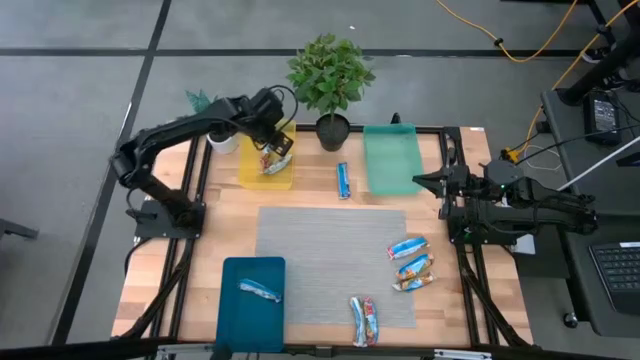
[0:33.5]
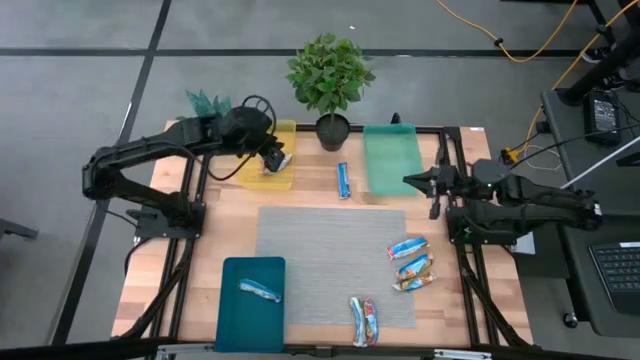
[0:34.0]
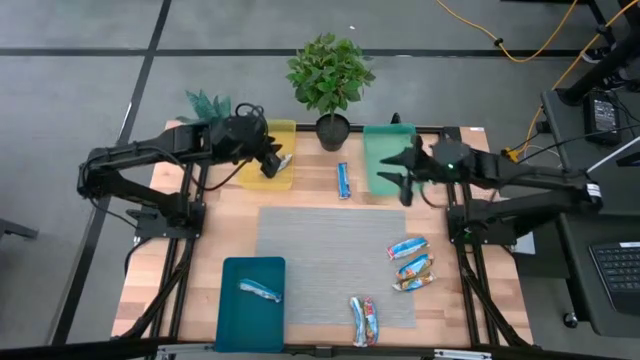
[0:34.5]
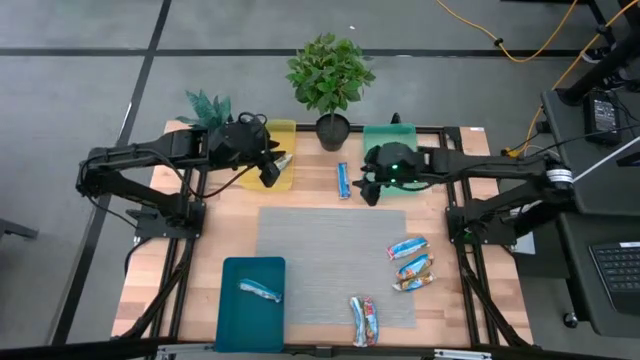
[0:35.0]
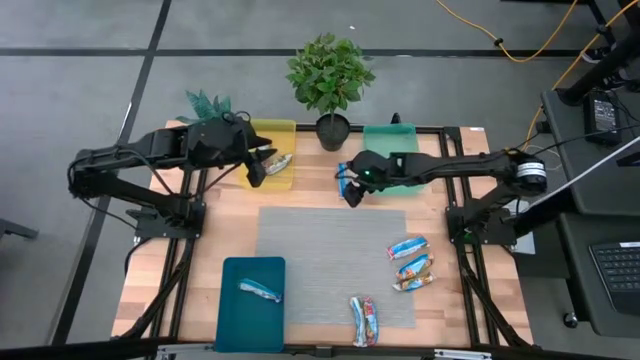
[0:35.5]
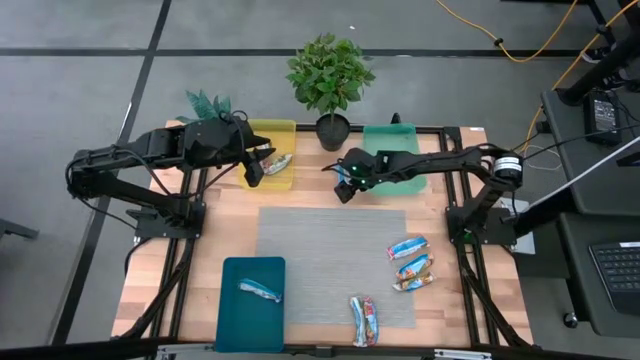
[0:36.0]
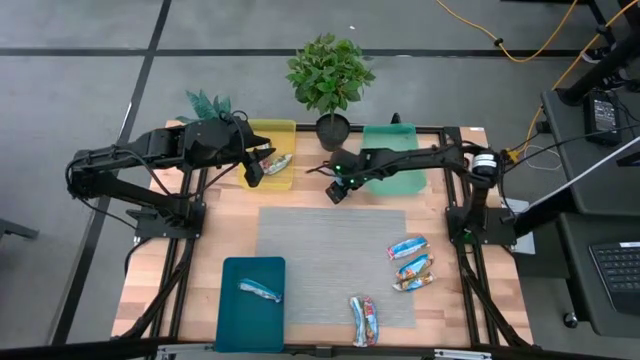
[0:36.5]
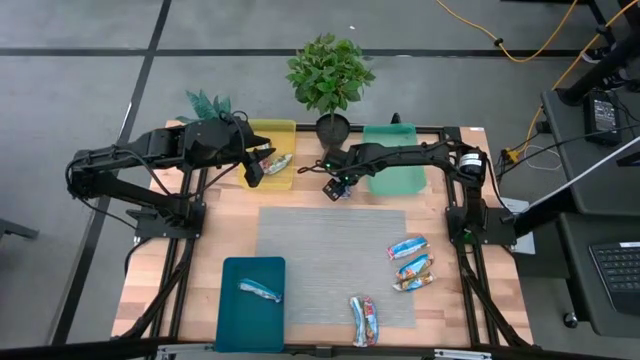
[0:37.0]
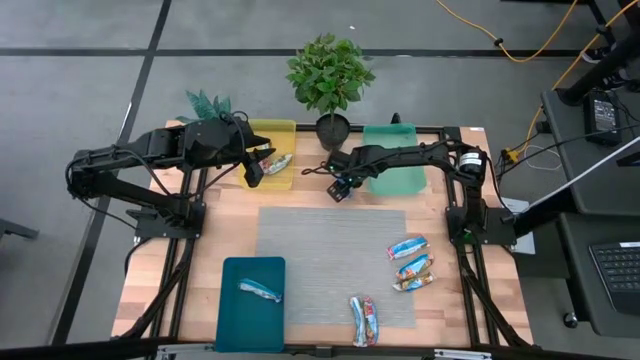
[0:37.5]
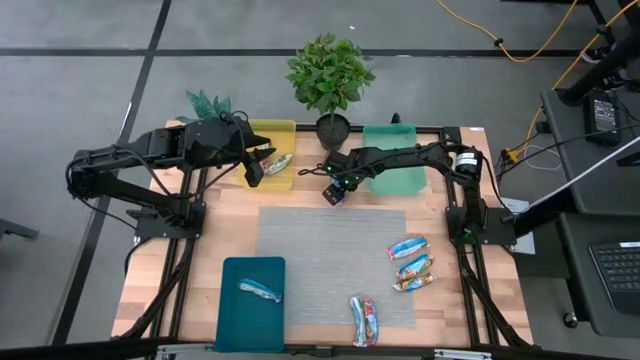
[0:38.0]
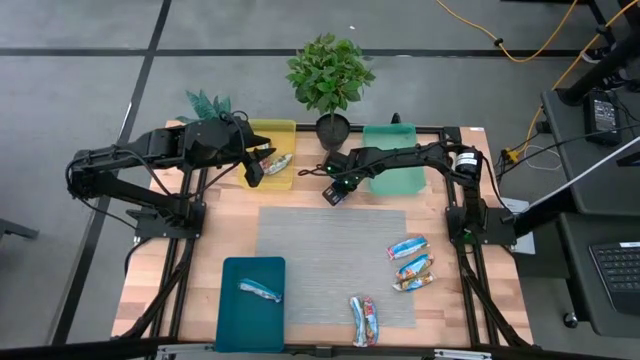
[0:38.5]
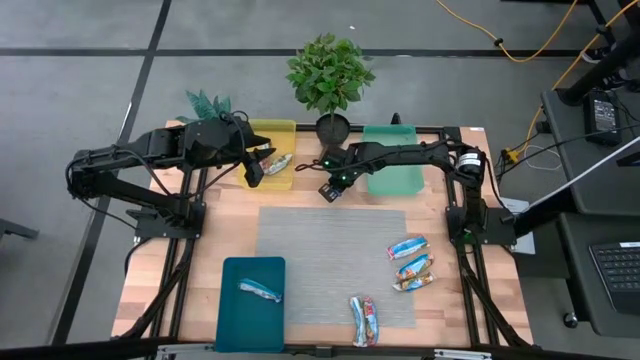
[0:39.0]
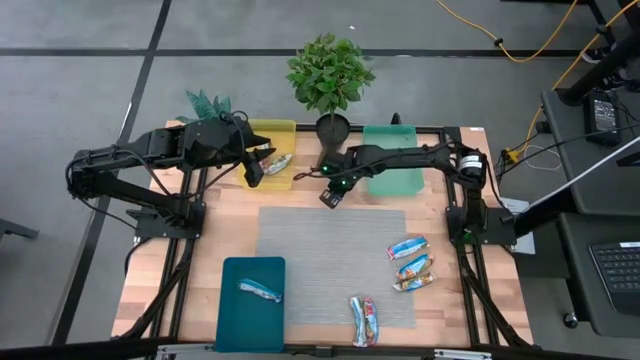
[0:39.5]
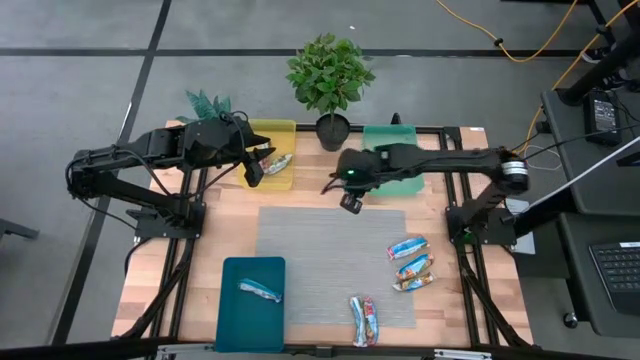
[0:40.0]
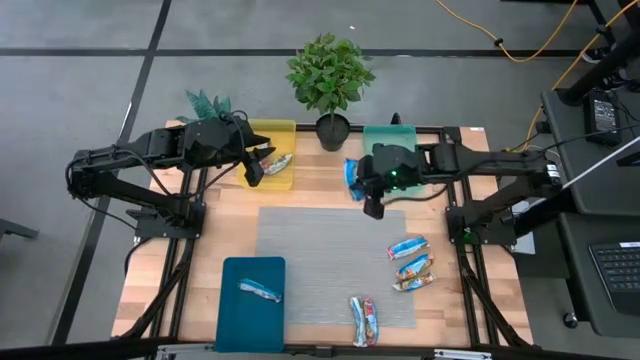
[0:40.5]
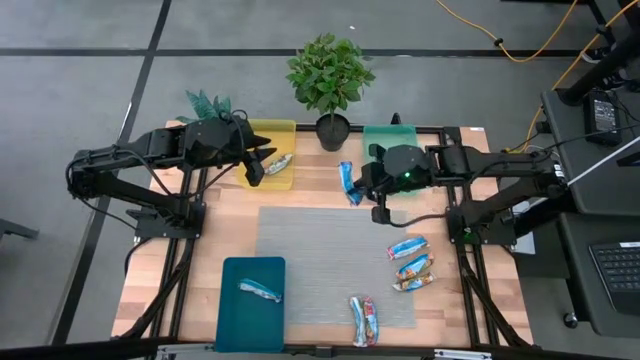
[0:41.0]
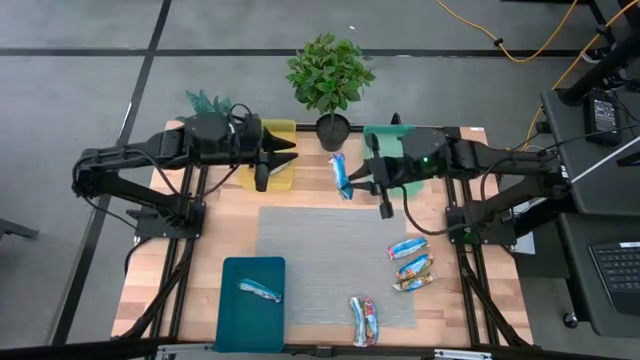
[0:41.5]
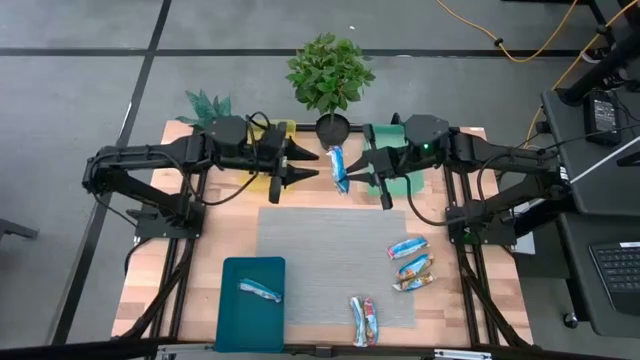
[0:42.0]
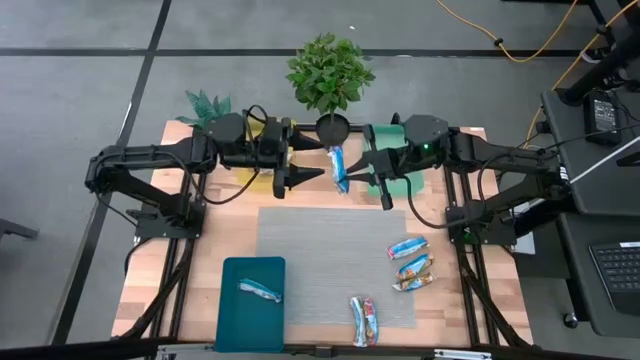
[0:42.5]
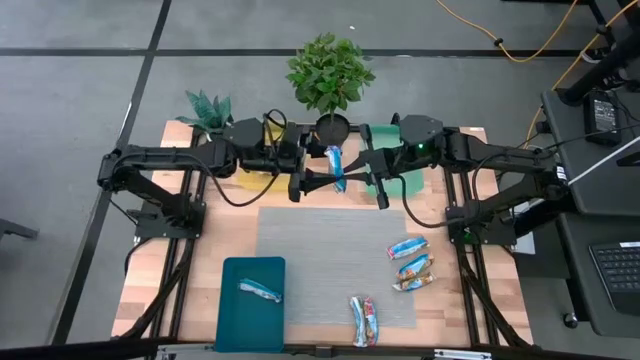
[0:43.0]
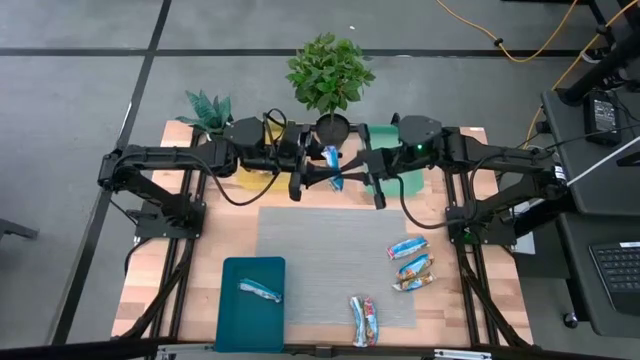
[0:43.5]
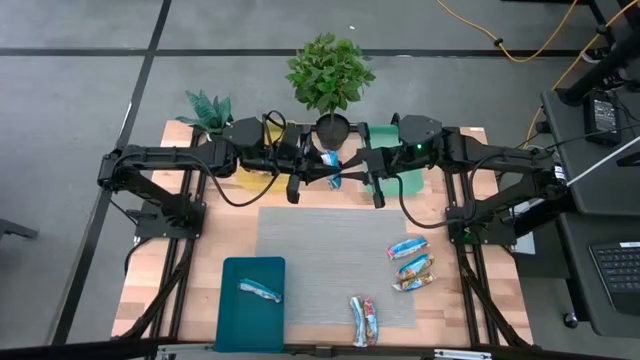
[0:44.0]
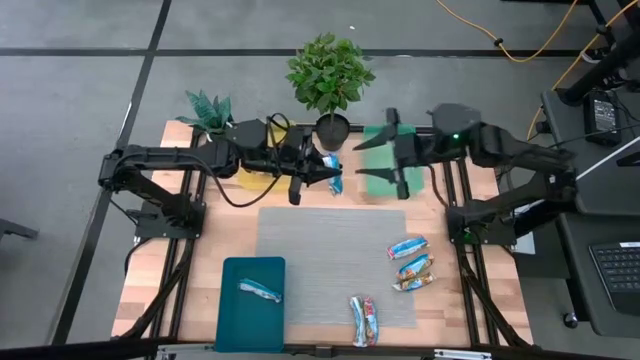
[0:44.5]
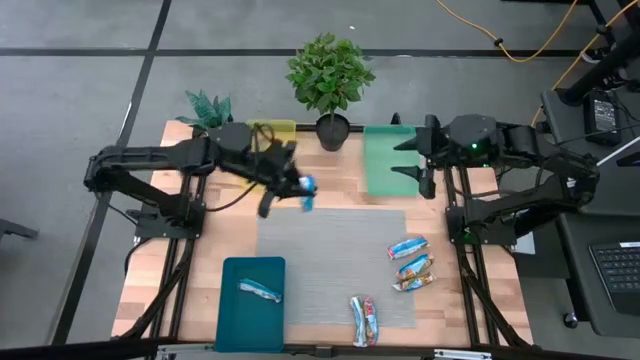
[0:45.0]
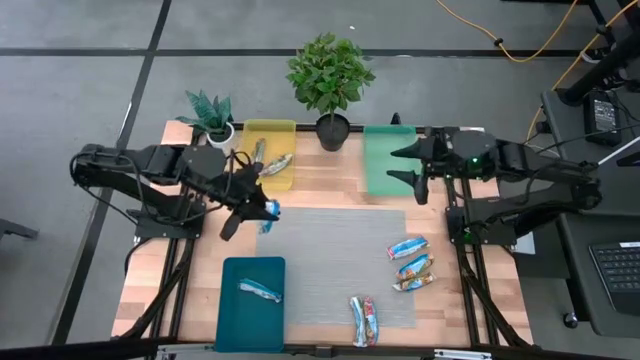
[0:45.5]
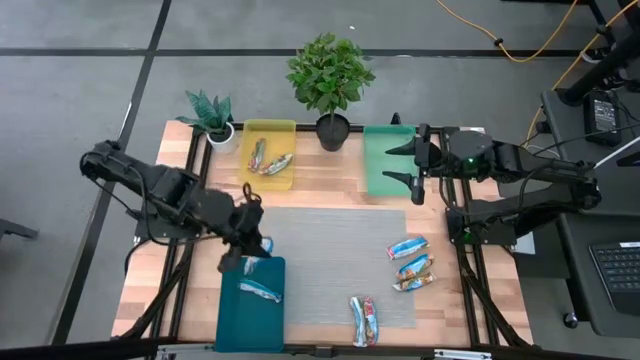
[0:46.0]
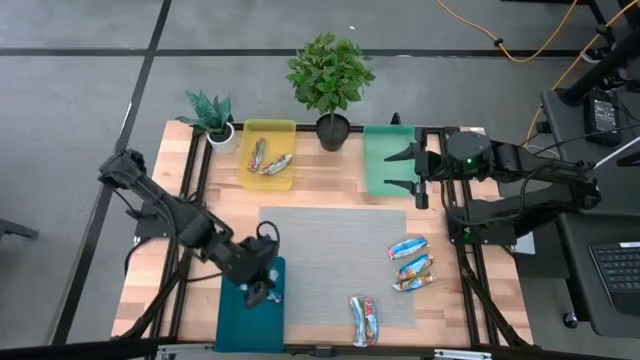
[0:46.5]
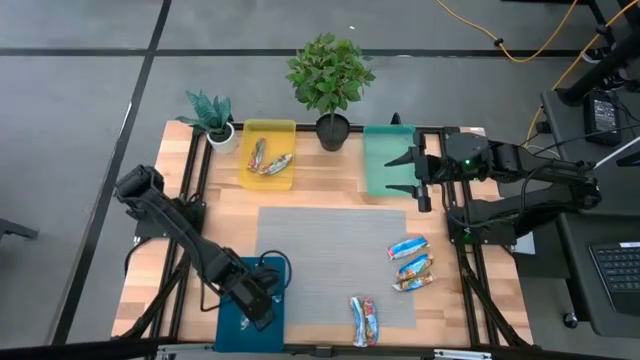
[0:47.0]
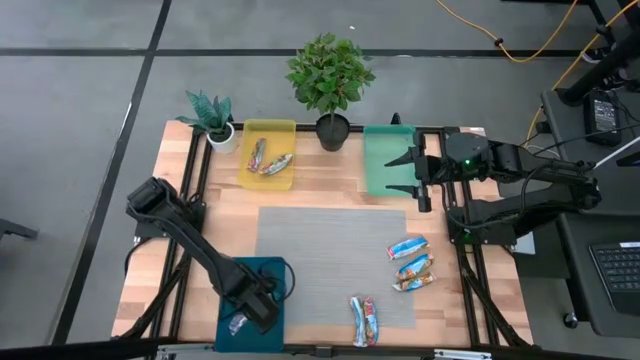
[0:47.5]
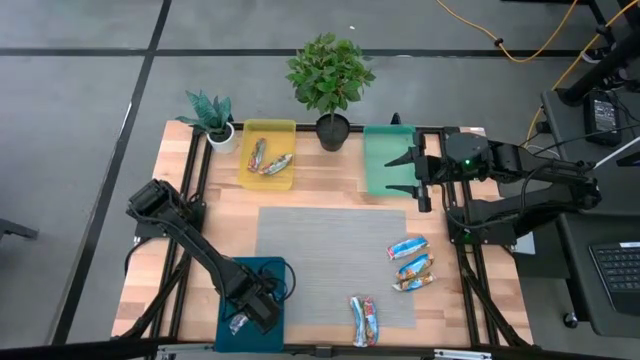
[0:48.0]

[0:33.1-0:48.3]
Task: Pick and place Granola Bars by type
Put the blue granola bar into the blue transparent bin

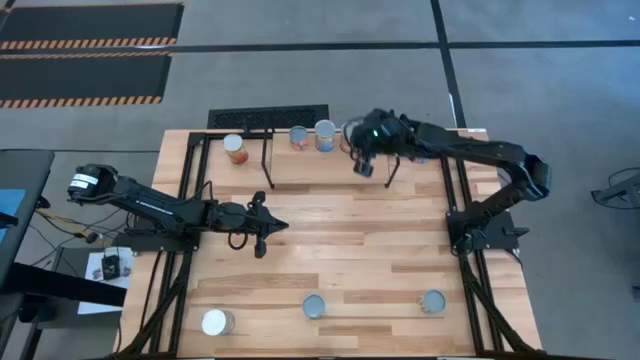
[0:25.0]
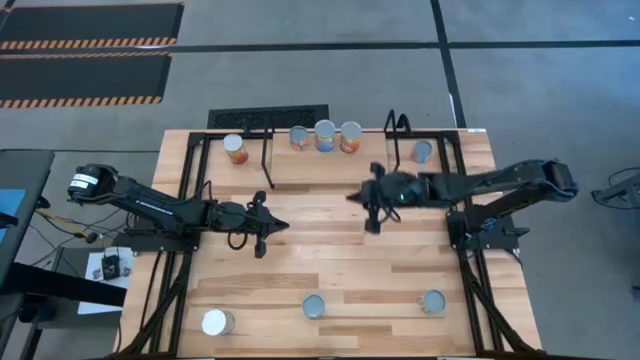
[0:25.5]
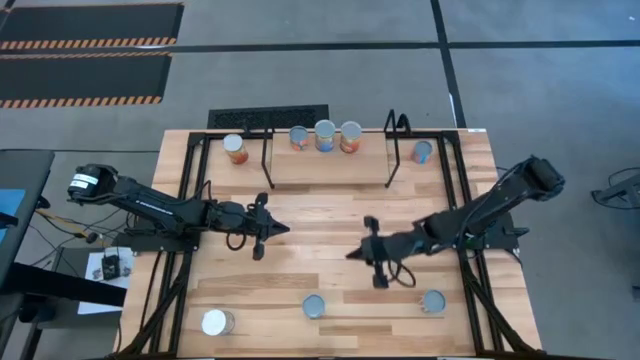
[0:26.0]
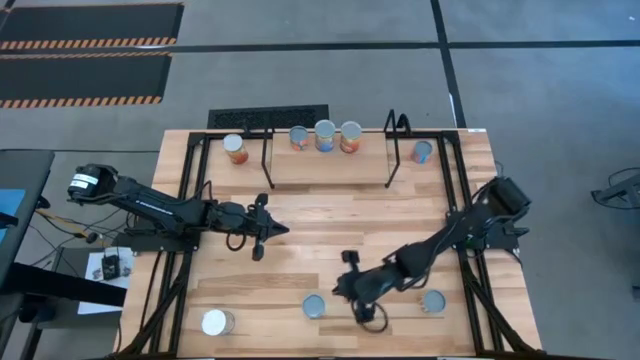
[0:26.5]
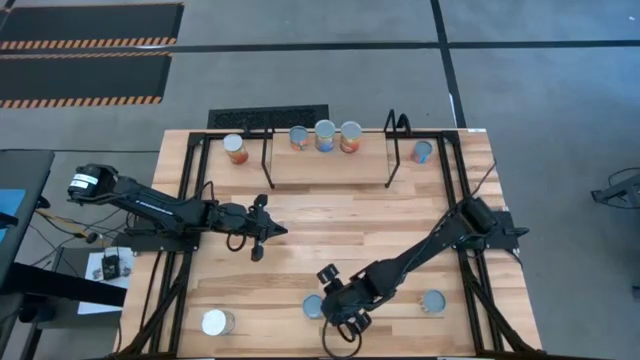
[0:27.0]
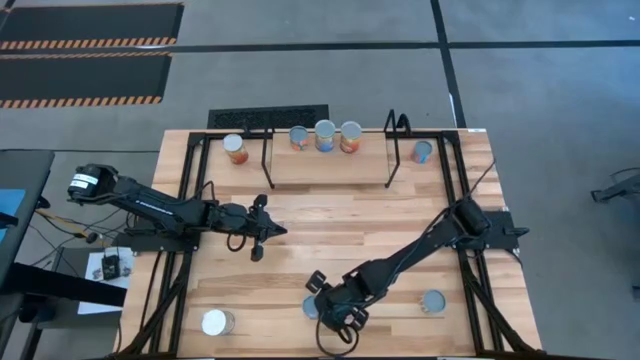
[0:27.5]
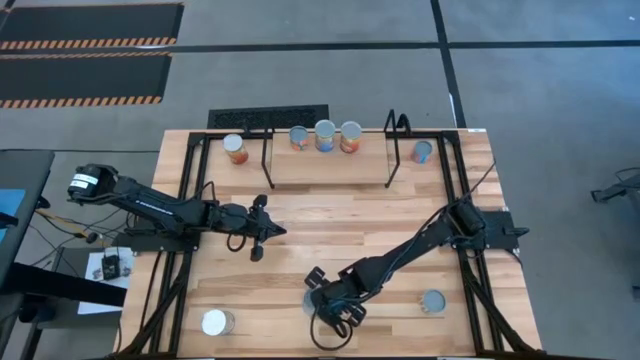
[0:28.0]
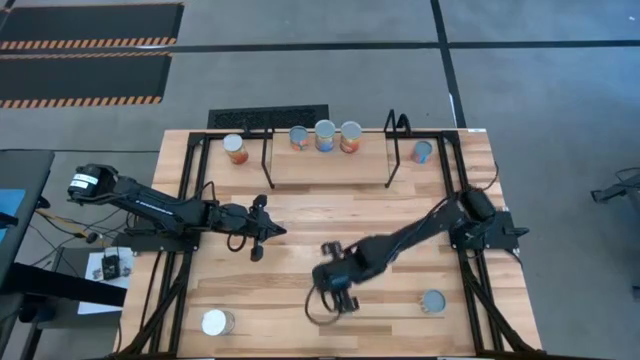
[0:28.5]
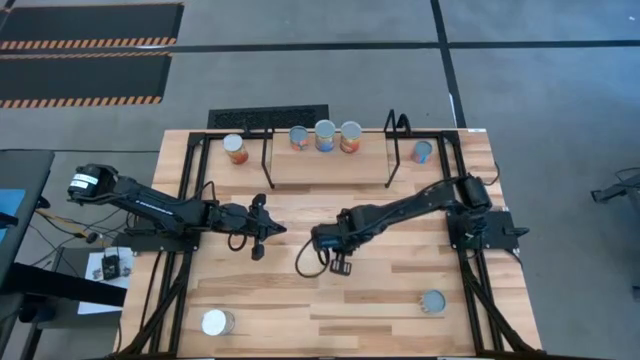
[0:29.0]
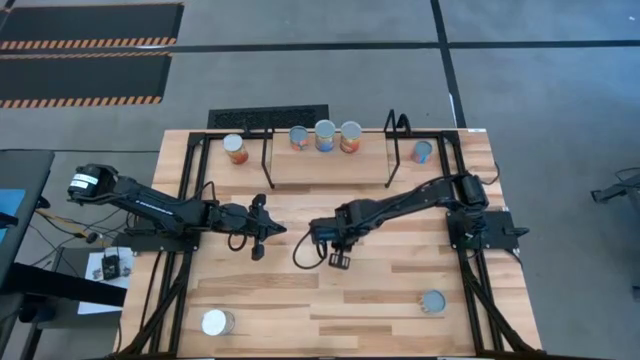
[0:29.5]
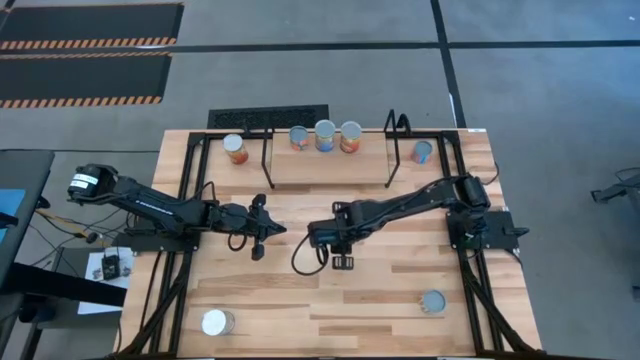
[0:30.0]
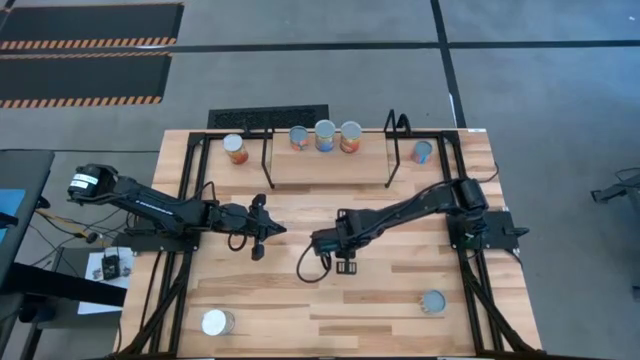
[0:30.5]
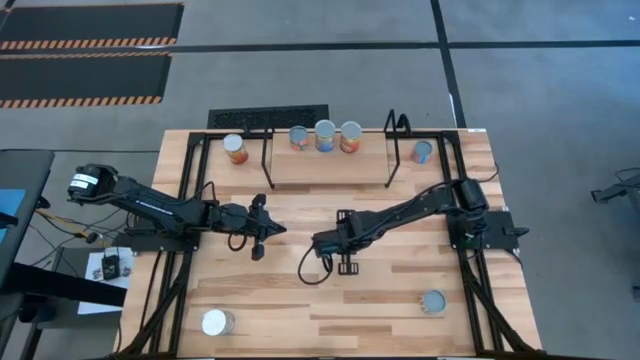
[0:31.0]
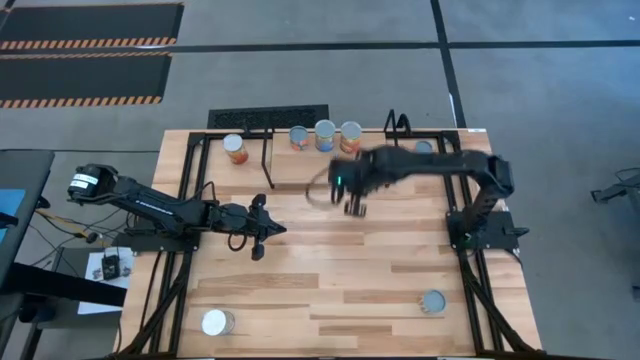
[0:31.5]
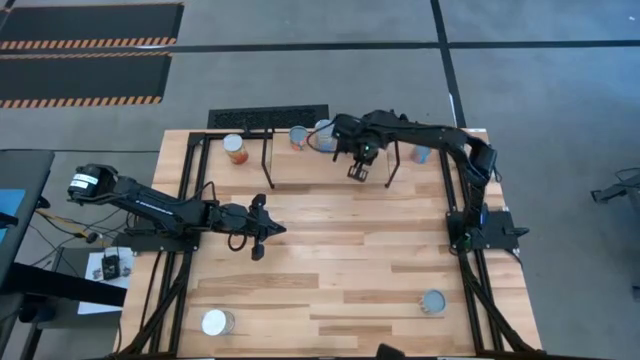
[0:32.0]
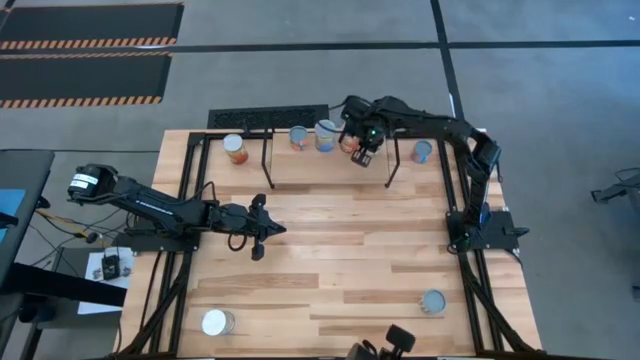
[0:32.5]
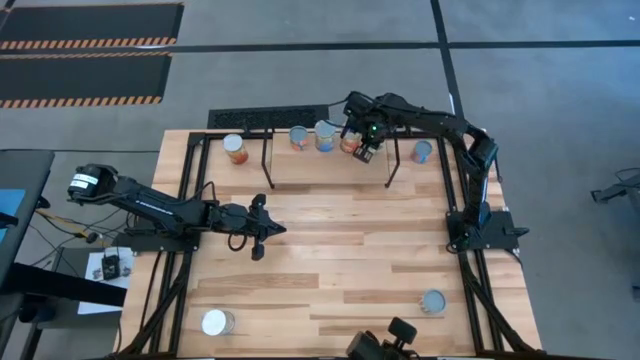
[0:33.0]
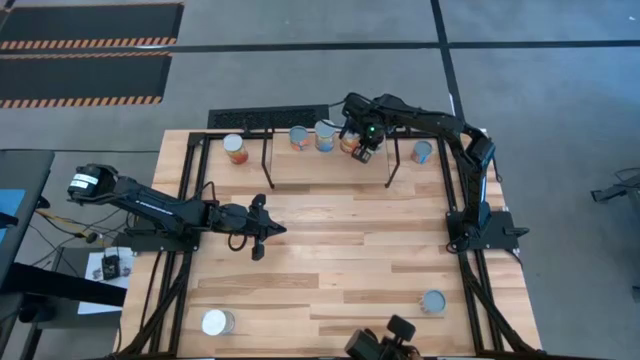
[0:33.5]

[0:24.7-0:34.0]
Task: Pick and place cans onto a shelf
Put the canned peas on the shelf
